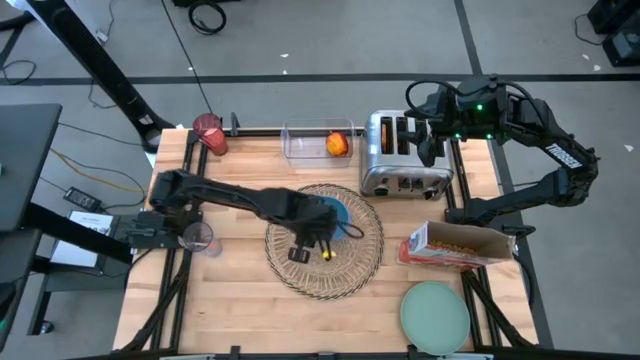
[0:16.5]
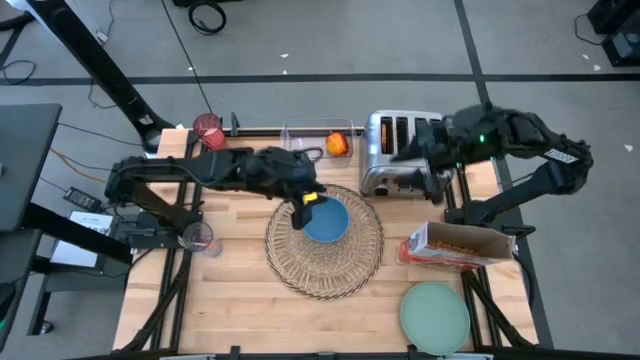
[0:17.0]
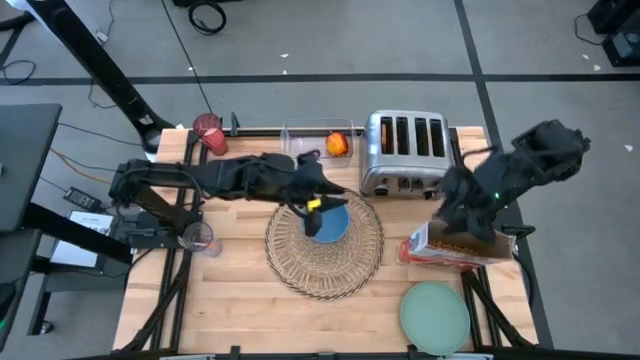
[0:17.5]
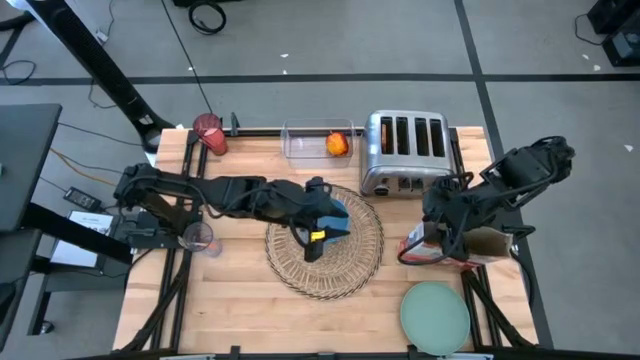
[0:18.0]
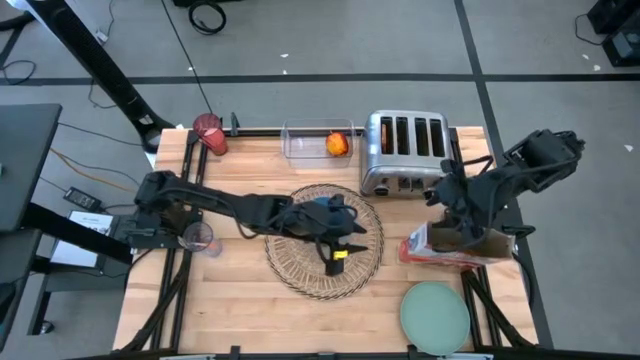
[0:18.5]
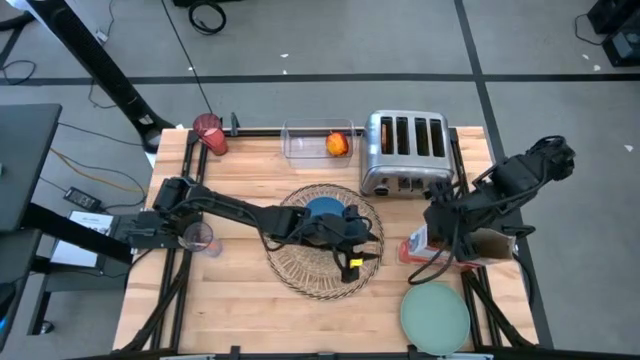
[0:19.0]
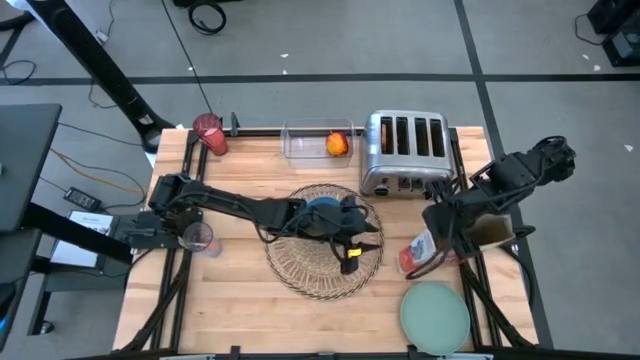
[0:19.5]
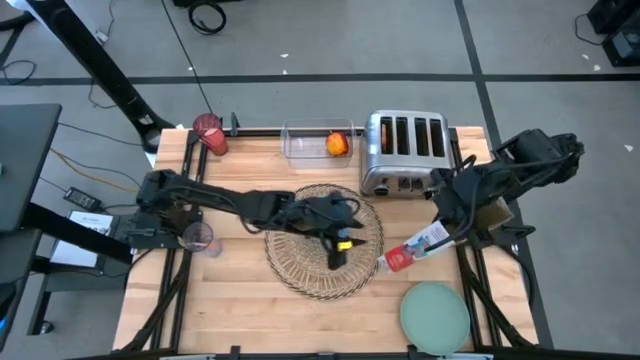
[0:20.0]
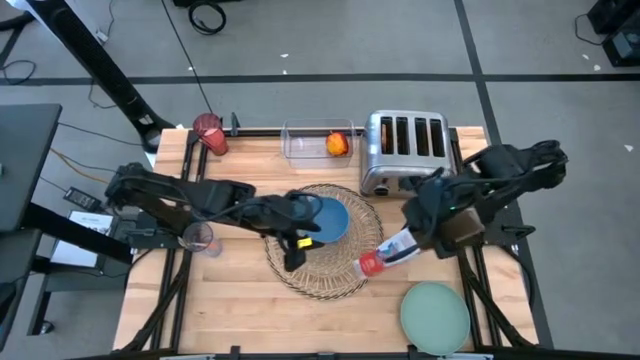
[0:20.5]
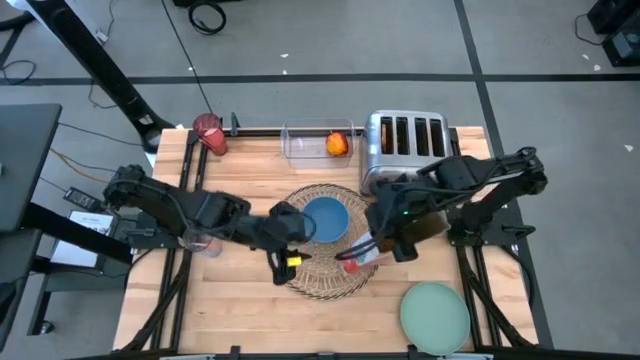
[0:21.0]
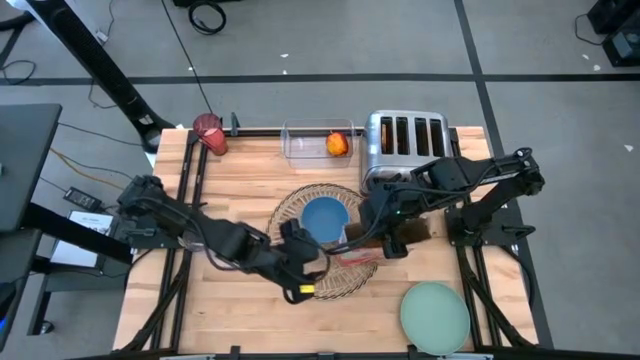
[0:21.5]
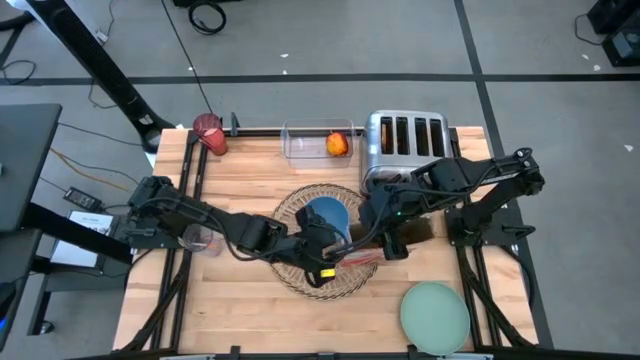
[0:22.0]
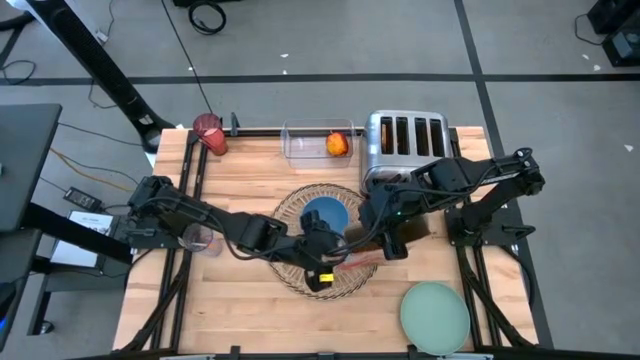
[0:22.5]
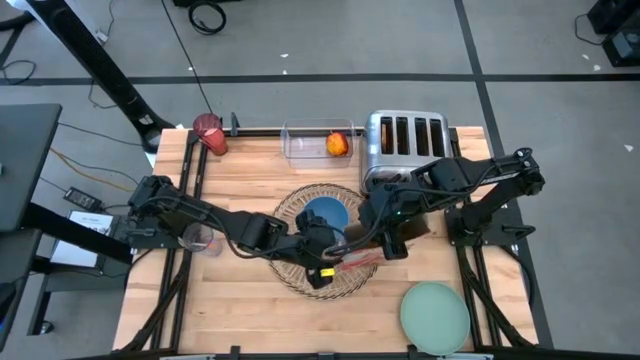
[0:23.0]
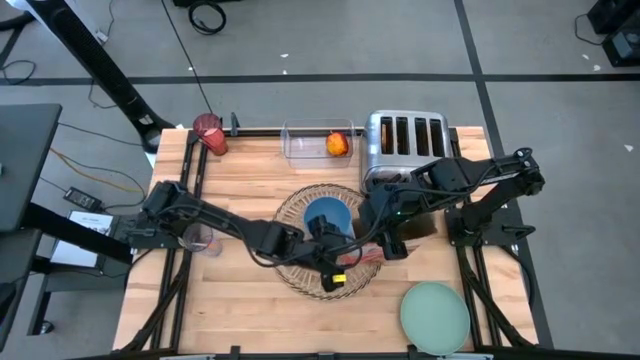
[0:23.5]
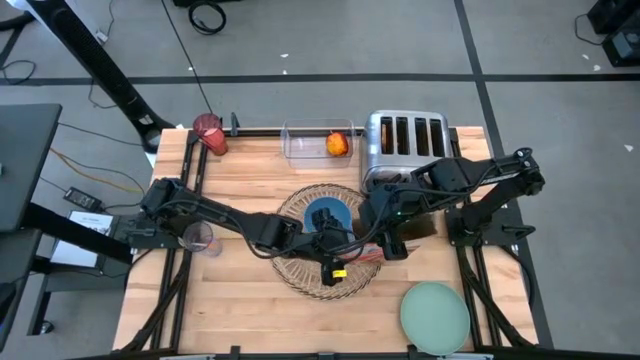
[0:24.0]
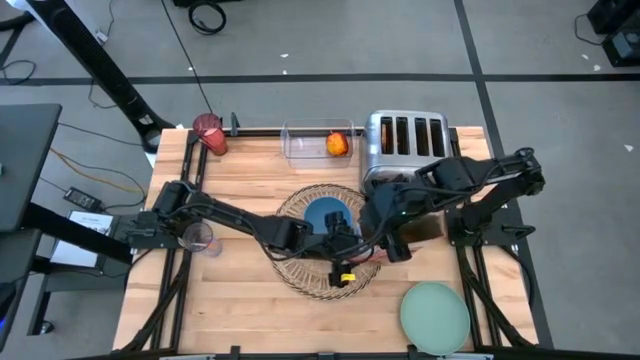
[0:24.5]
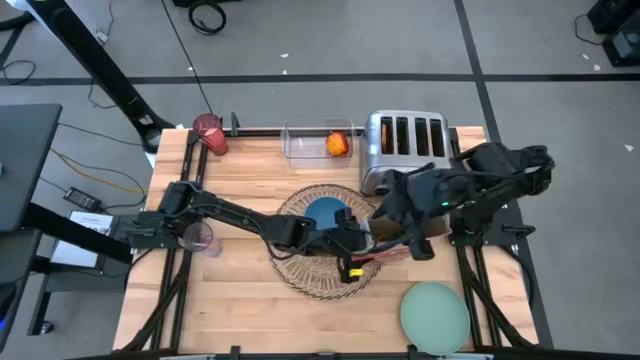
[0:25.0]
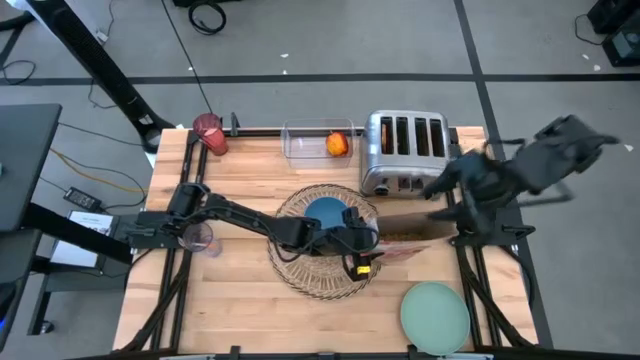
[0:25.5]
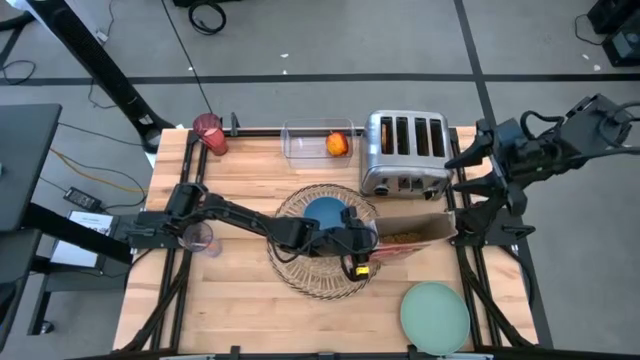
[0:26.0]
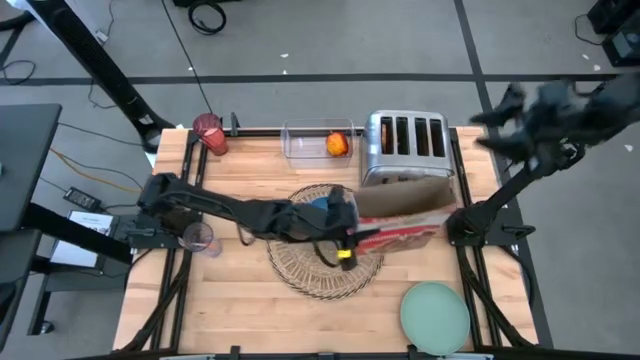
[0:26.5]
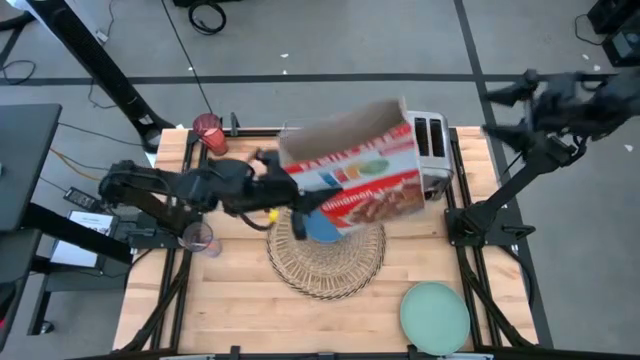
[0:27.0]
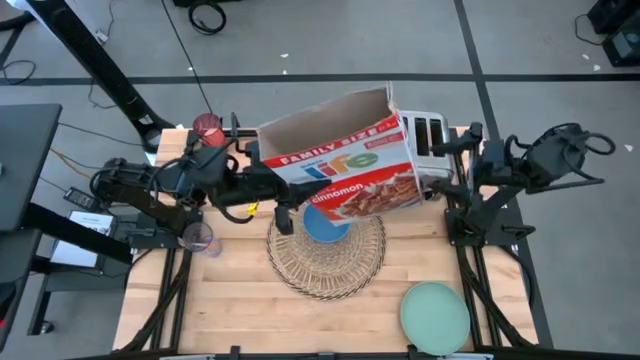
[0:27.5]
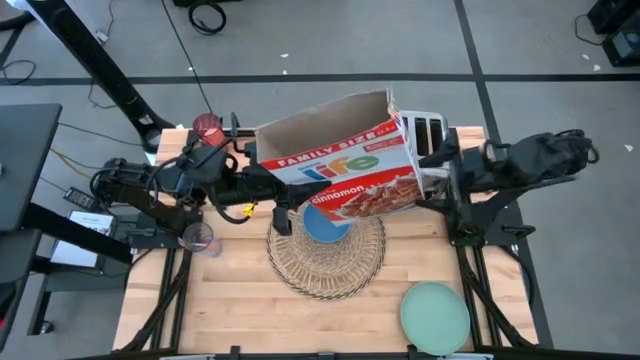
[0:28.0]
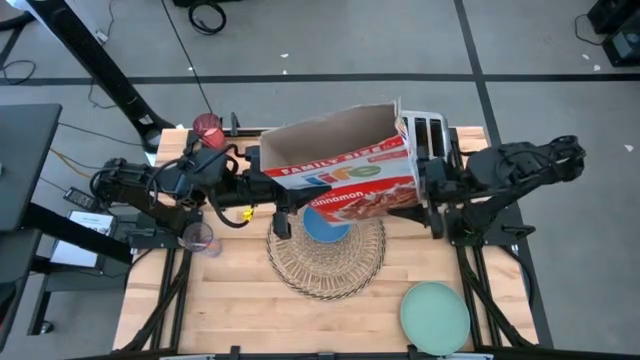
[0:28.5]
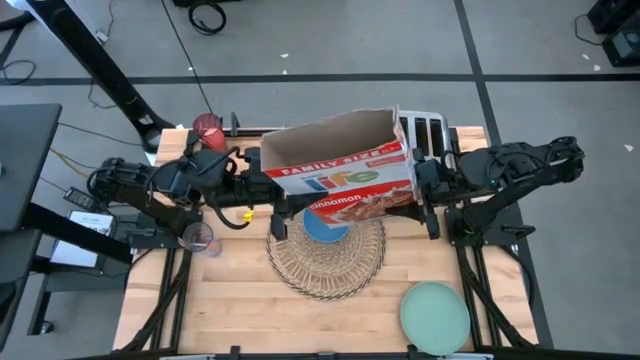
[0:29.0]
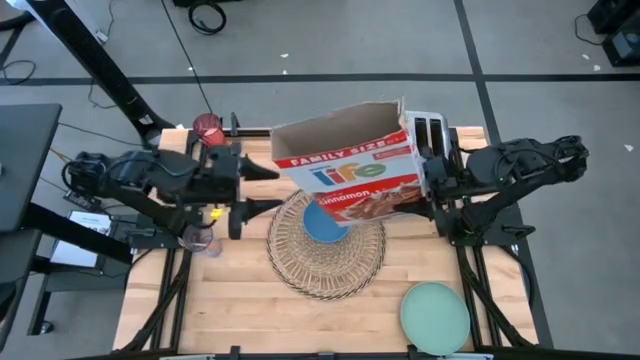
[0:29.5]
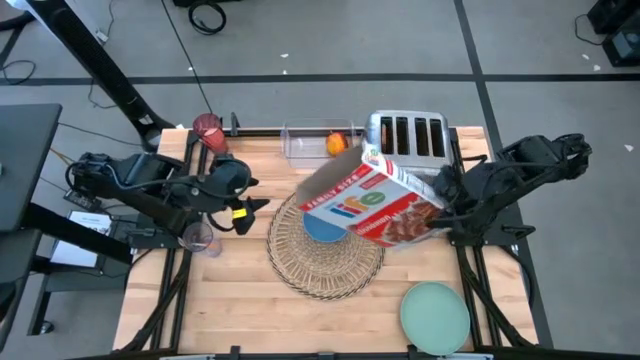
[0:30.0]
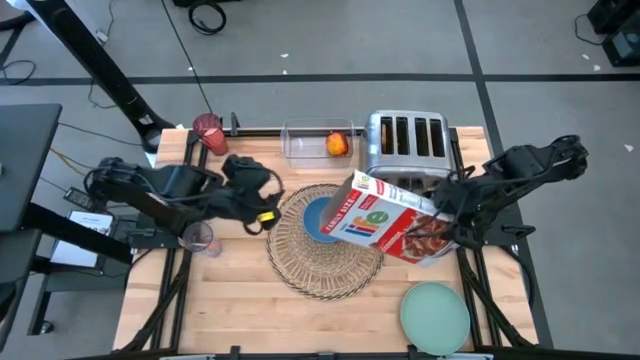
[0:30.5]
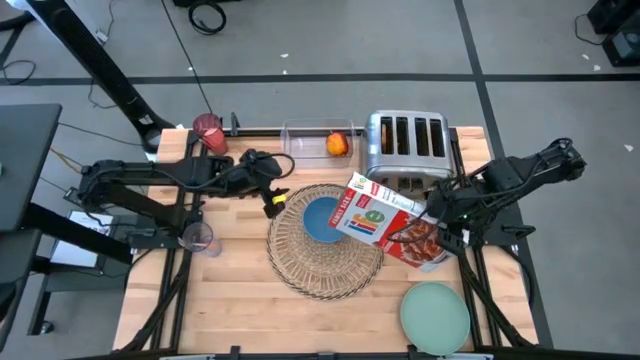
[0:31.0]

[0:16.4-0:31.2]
Task: Arrange a breakfast setting
Pour the cereal from the cereal box into the blue bowl
